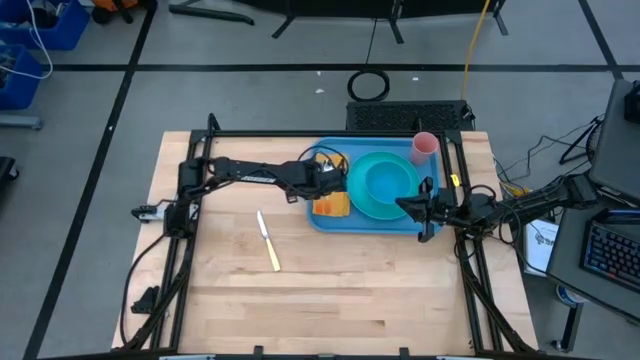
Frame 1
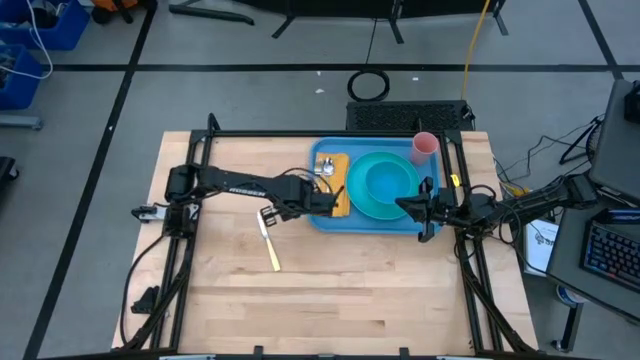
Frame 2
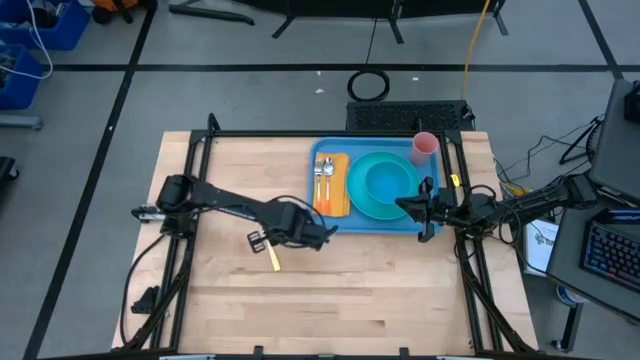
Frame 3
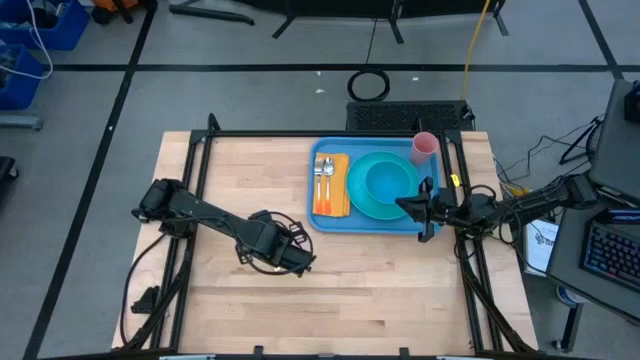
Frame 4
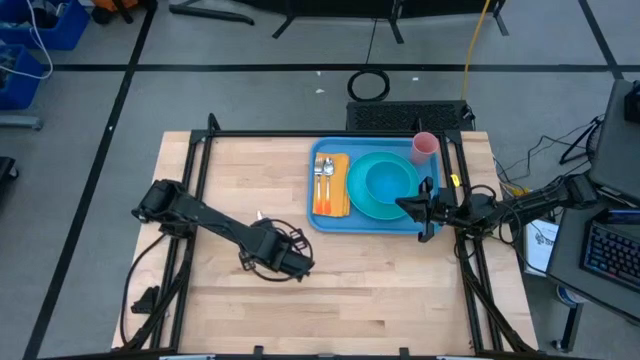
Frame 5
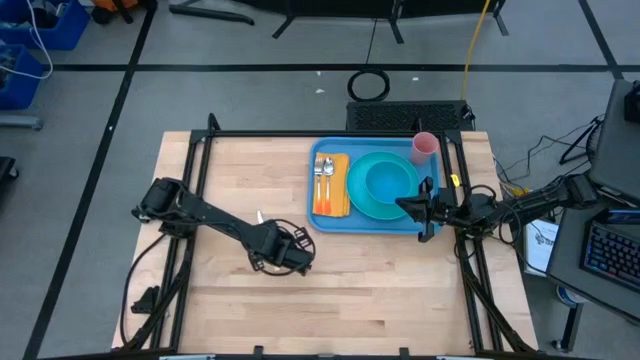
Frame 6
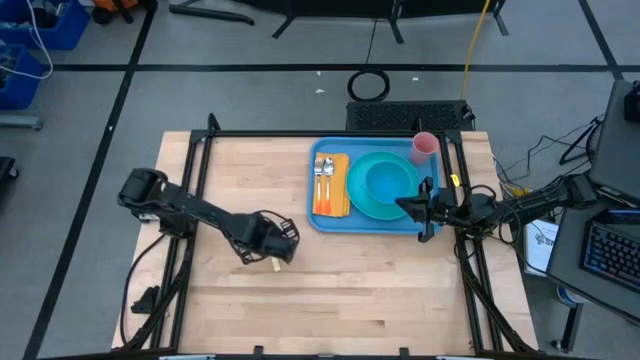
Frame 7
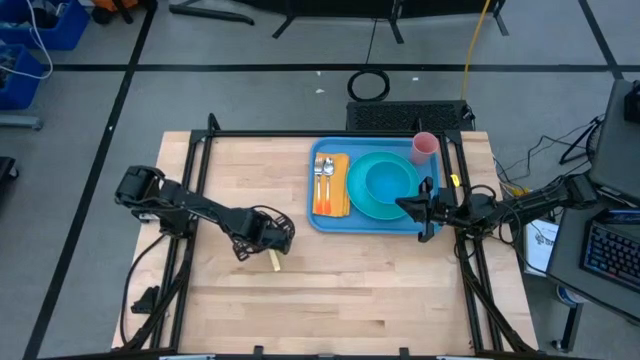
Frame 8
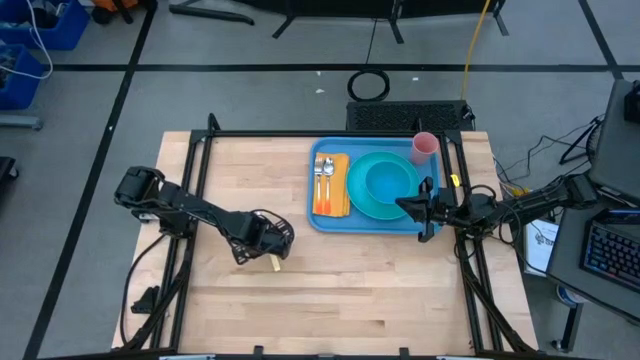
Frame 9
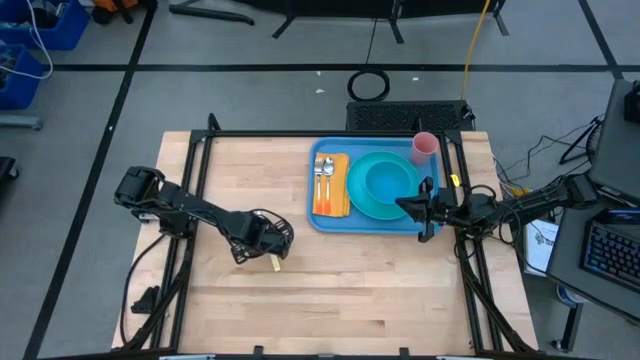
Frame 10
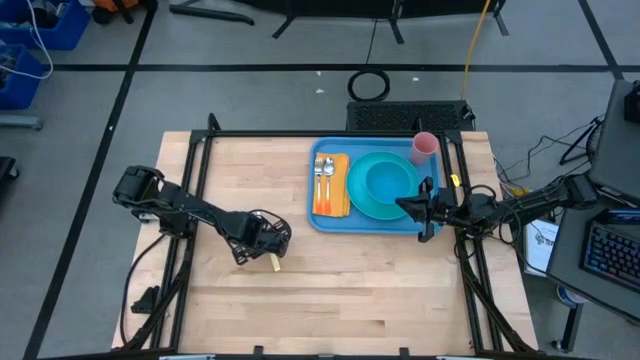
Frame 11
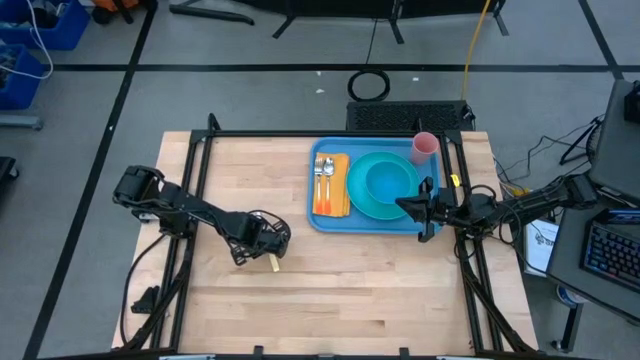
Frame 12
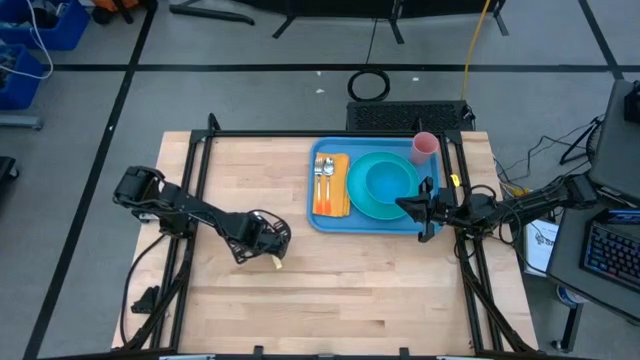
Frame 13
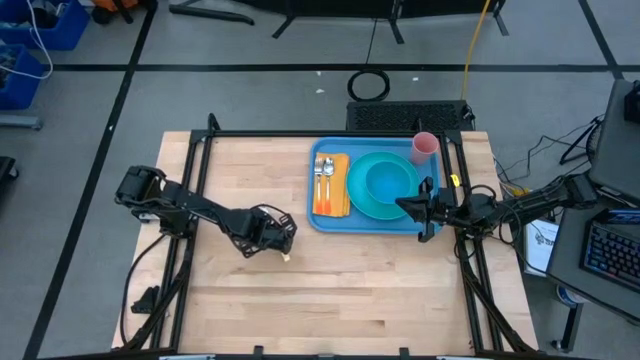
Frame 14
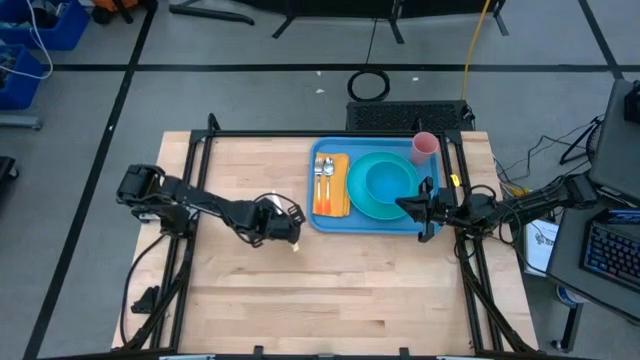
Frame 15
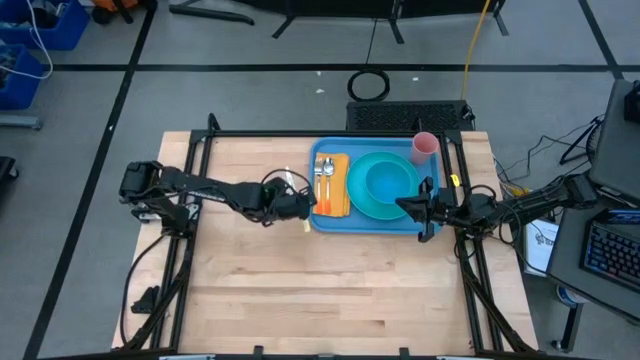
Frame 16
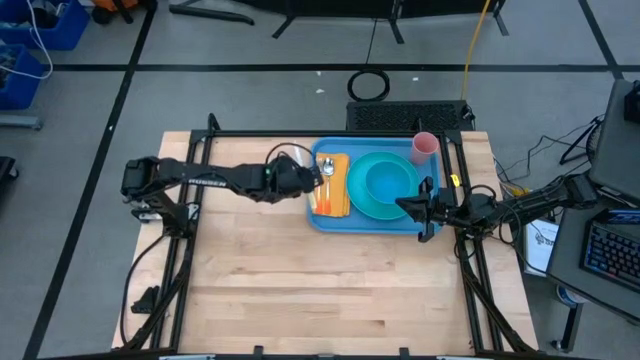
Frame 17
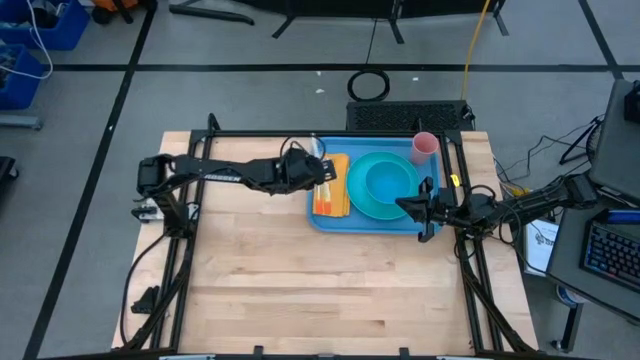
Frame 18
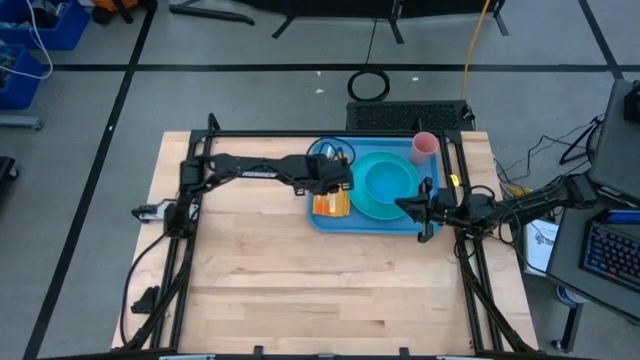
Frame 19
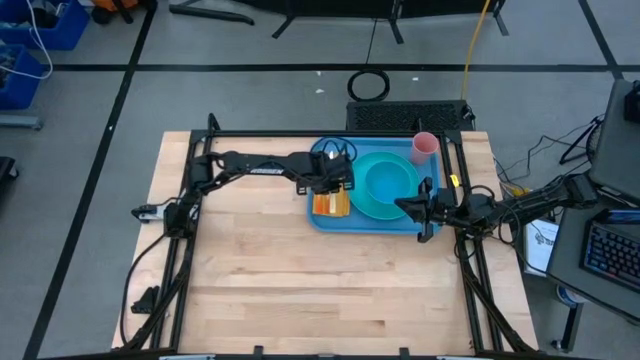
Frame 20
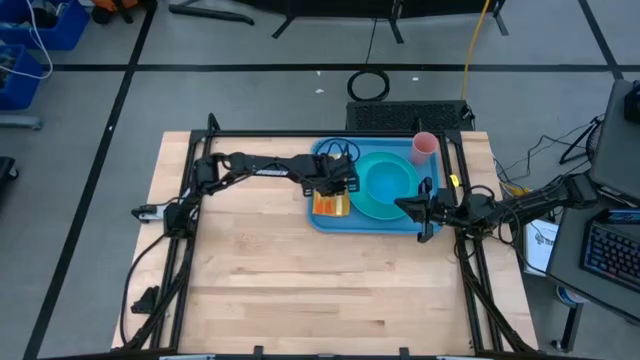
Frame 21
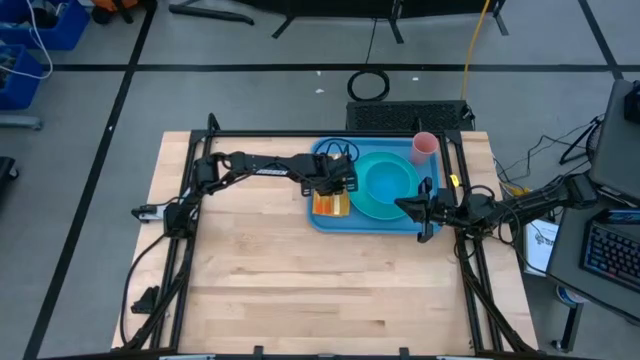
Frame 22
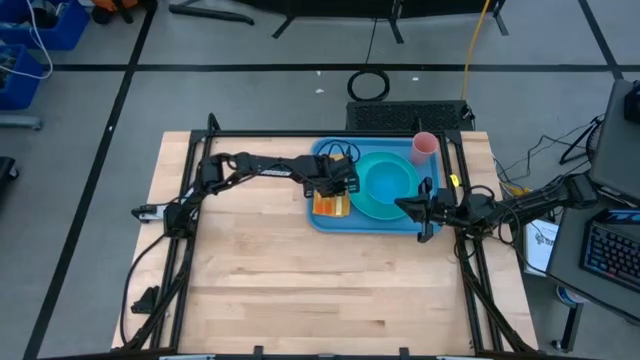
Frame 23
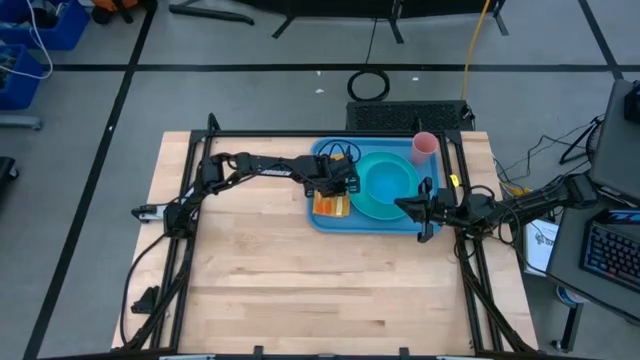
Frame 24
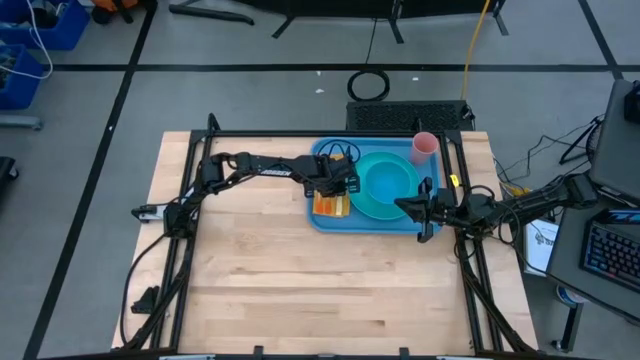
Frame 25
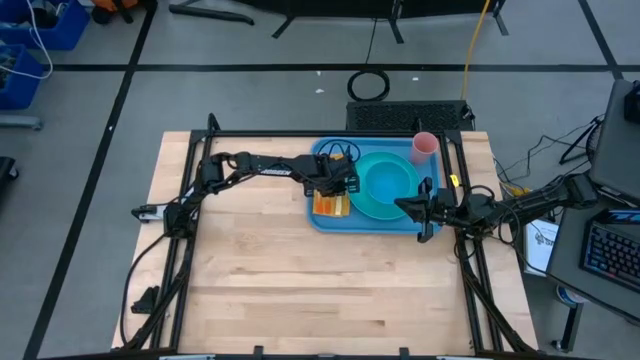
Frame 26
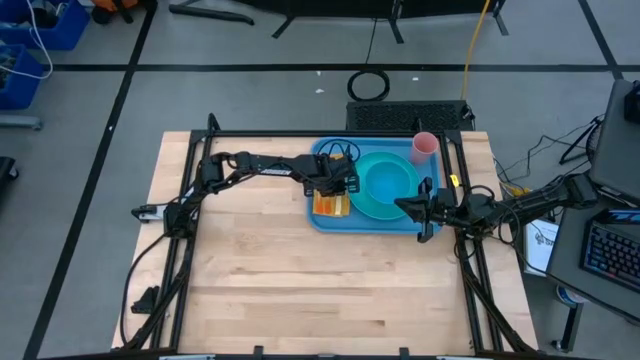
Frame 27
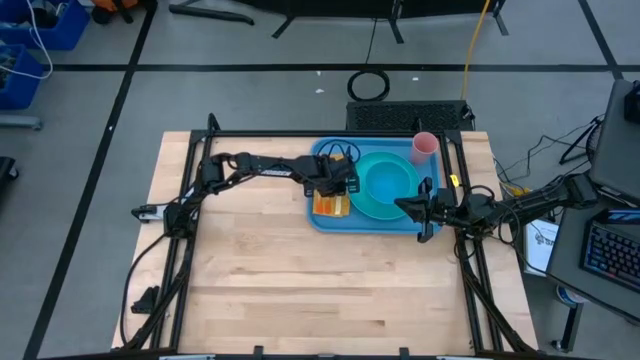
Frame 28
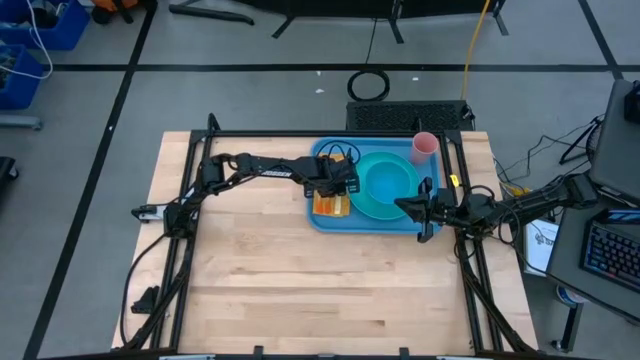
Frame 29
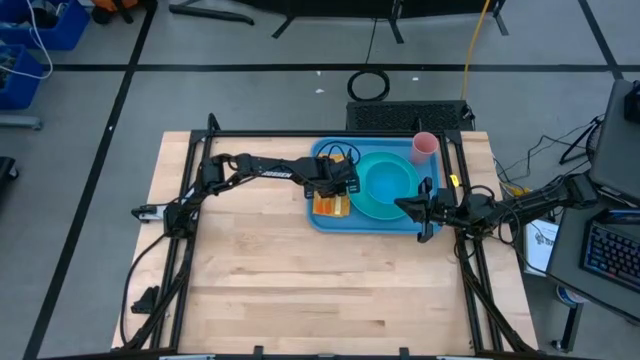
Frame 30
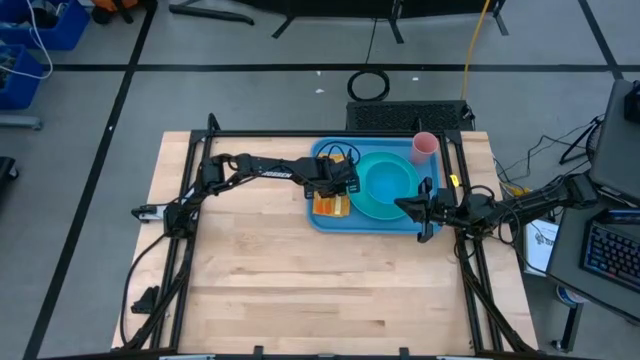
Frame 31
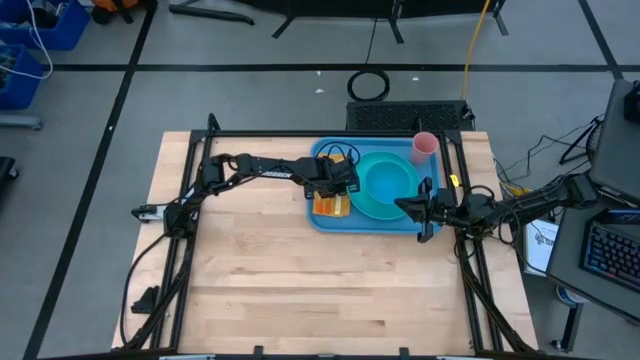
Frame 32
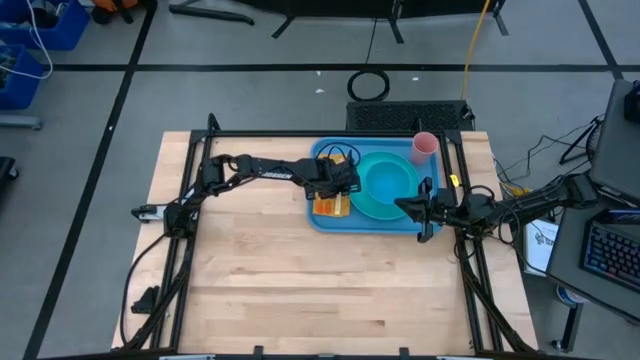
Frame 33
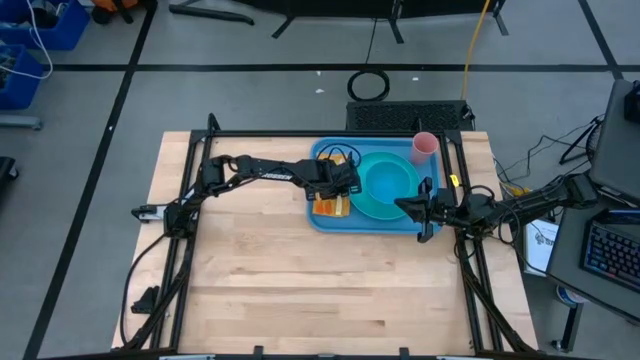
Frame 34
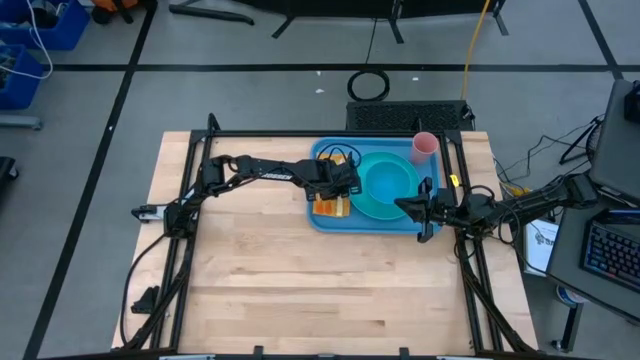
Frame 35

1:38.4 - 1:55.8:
Task: Set up tray
Put the silver knife onto the blue tray

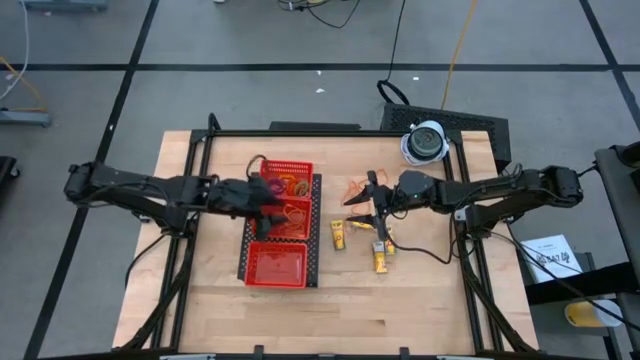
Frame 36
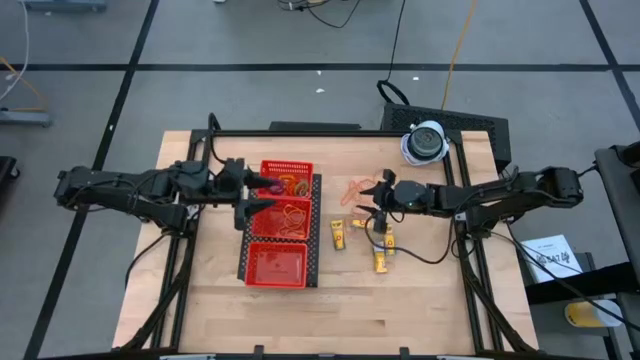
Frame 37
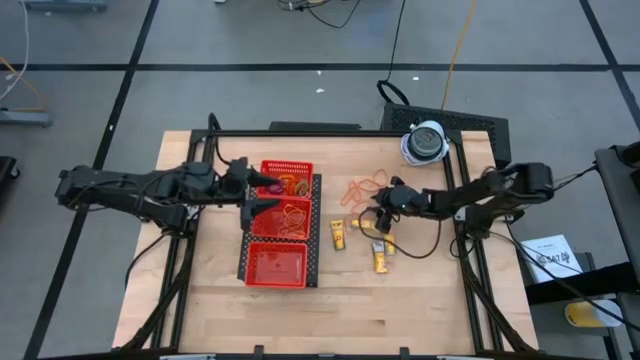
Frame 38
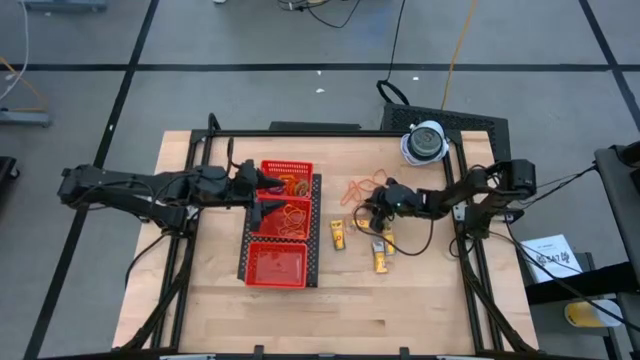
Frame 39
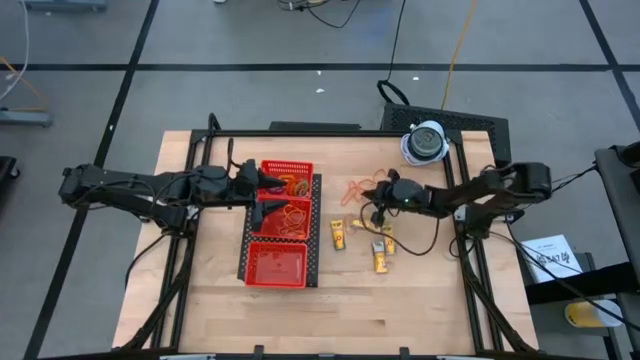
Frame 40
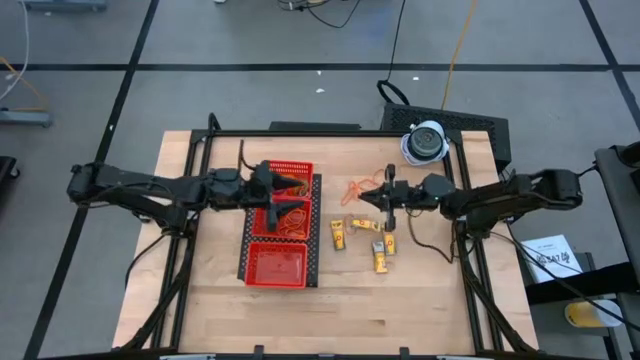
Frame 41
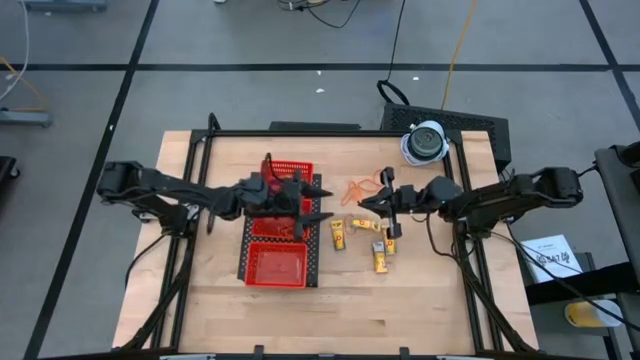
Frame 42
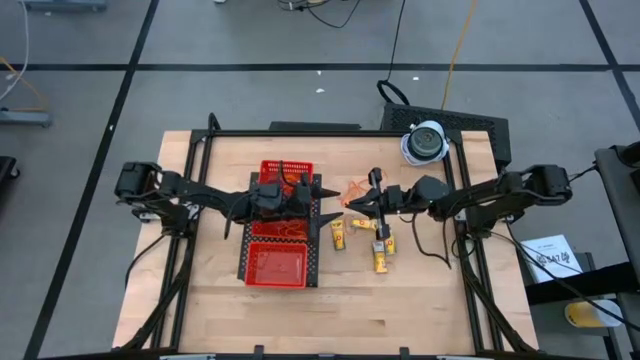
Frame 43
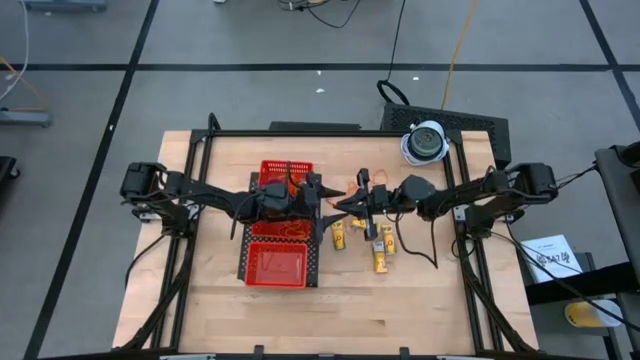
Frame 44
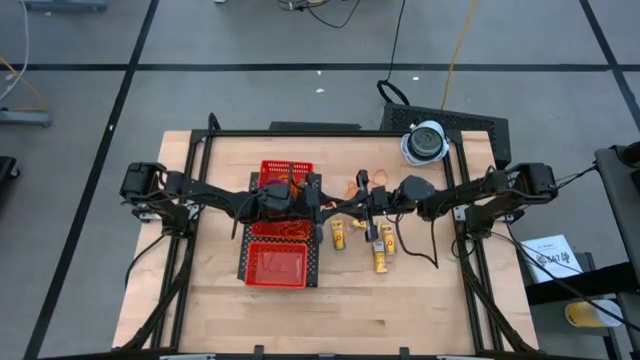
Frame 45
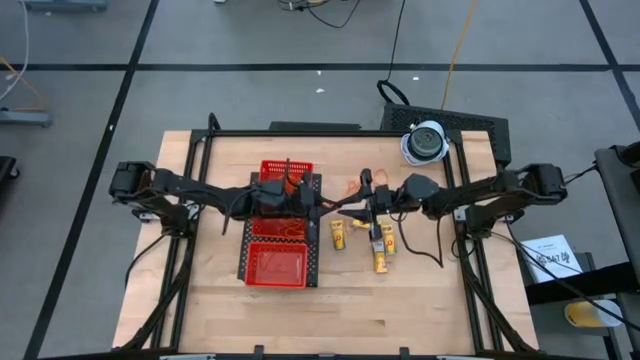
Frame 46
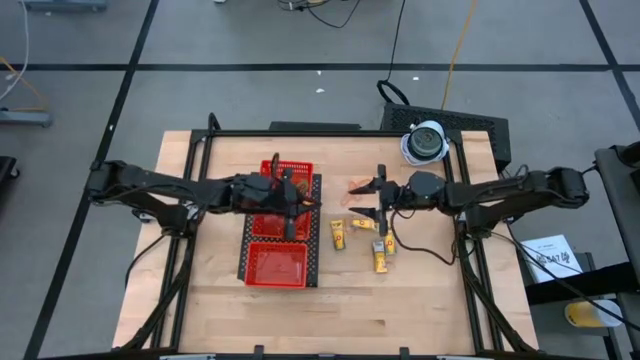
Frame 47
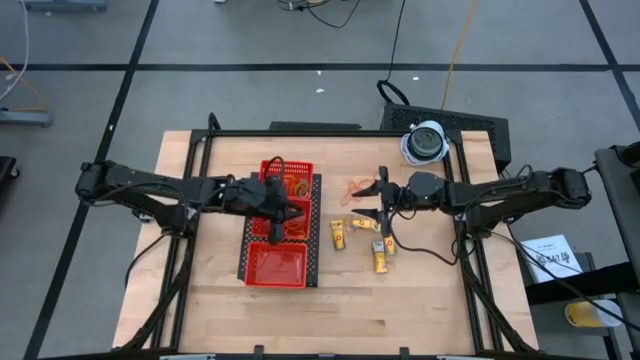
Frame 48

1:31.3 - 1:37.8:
Task: Pick & Place Office Desk Supplies
Put the orange rubber band into the middle red basket on the shelf
